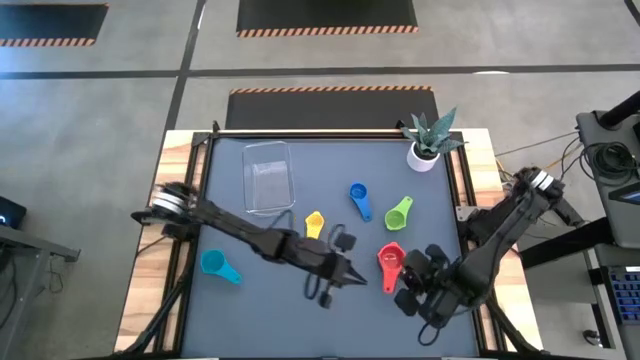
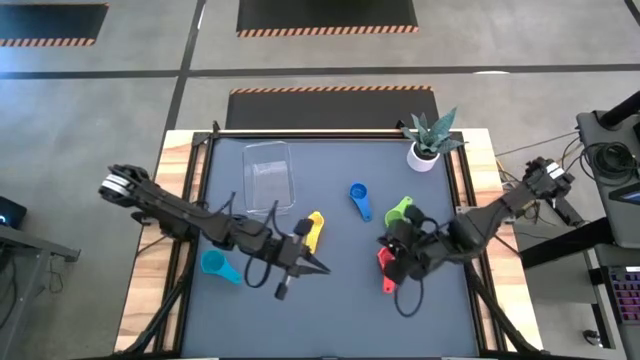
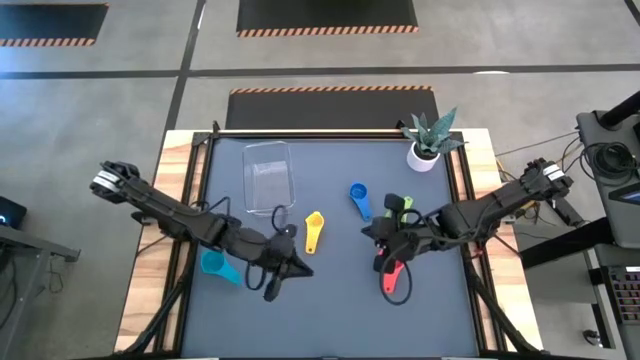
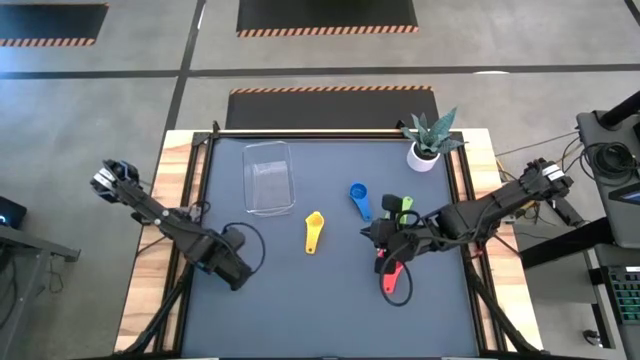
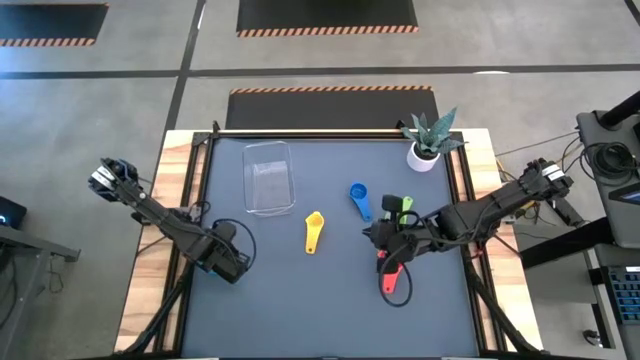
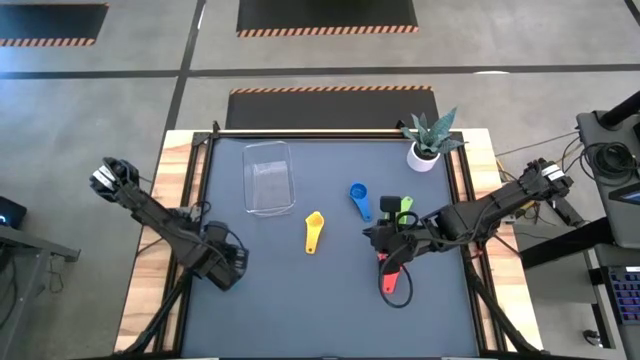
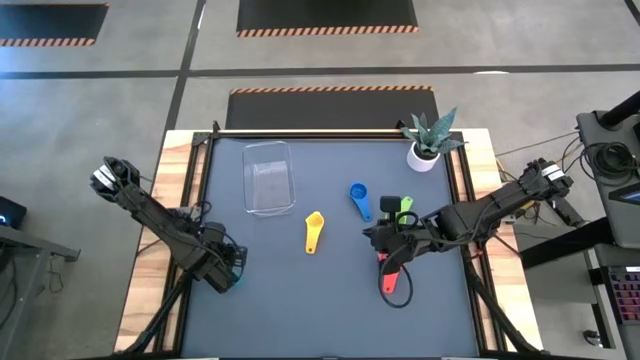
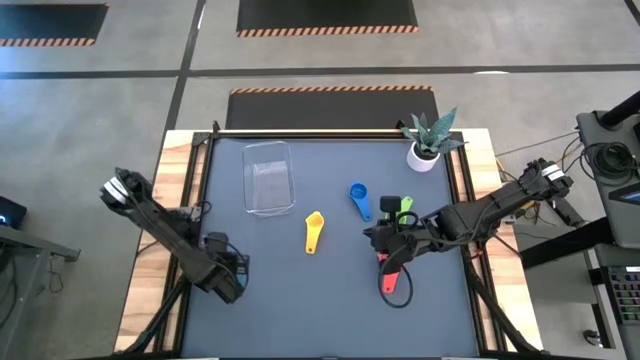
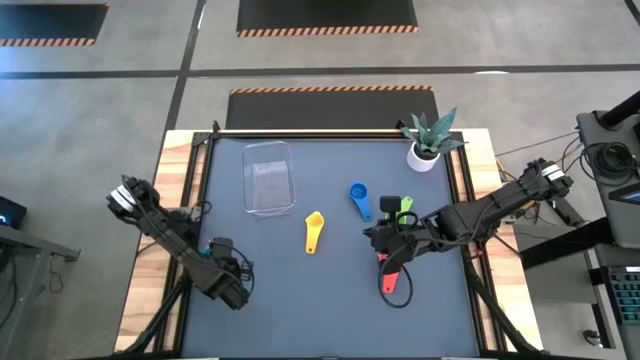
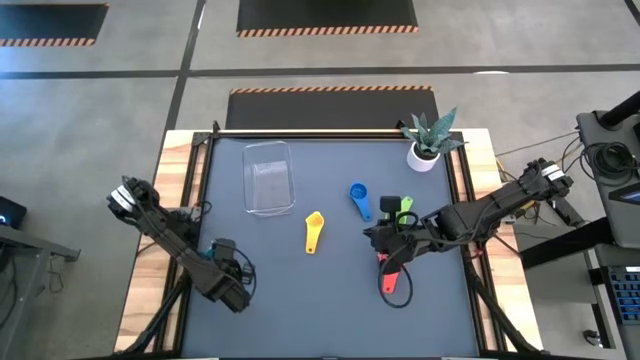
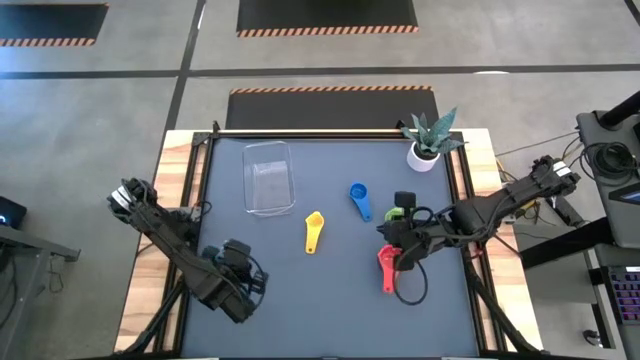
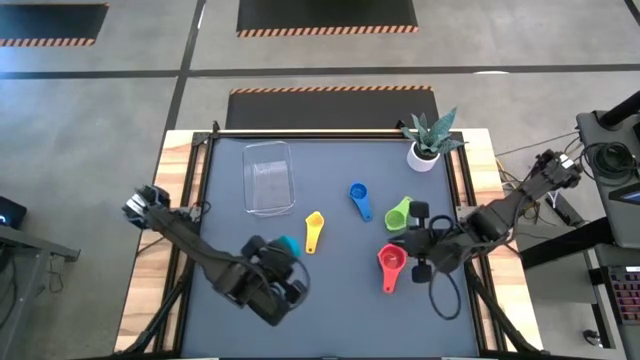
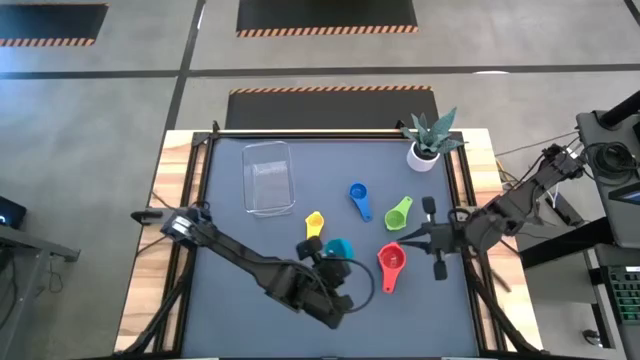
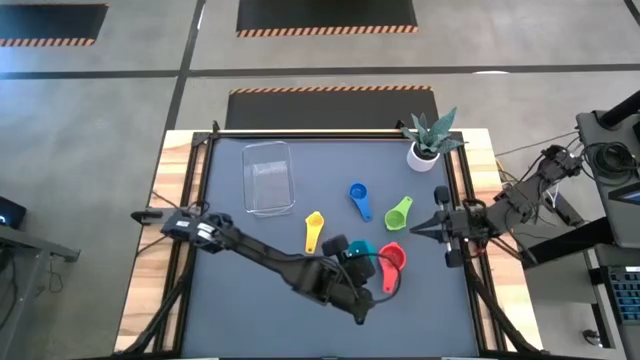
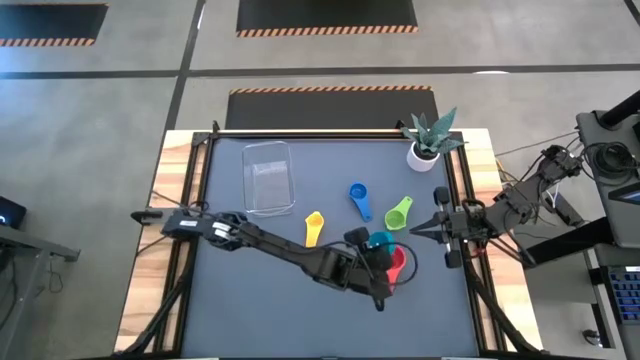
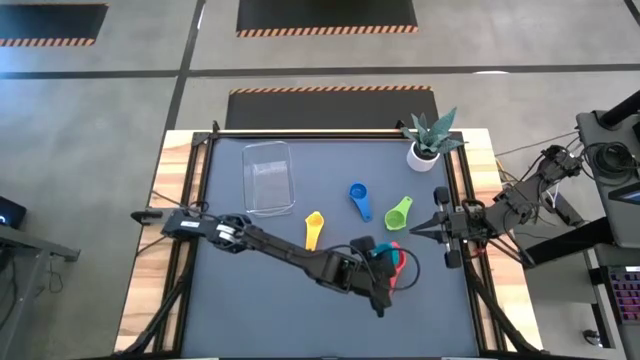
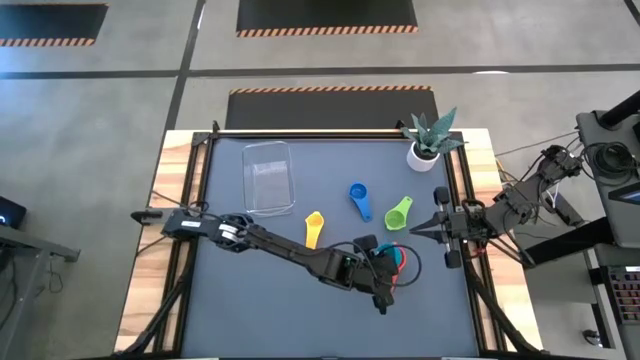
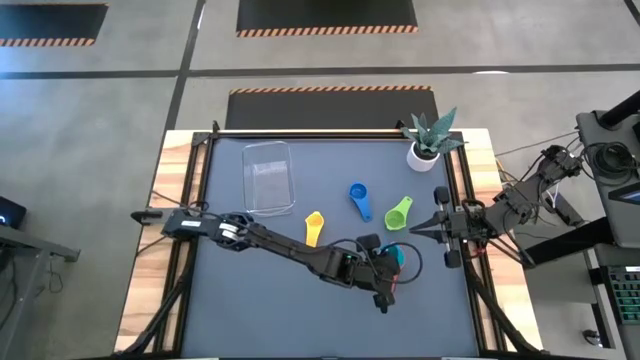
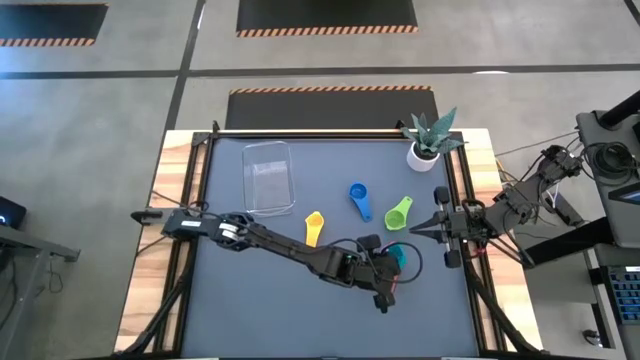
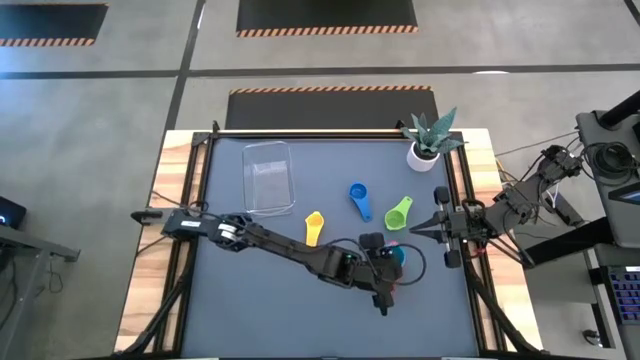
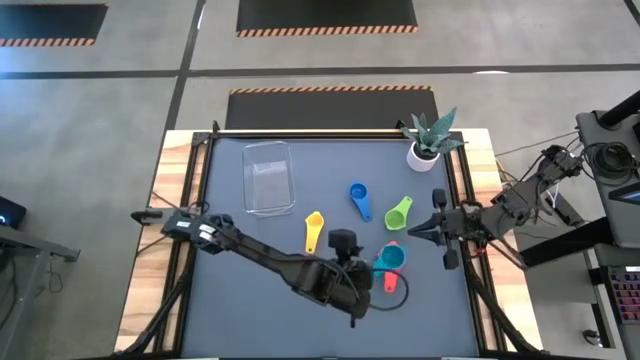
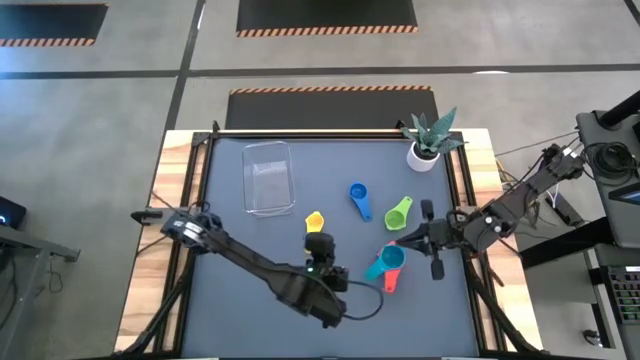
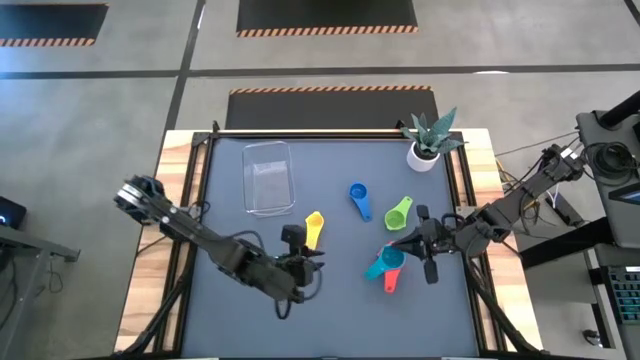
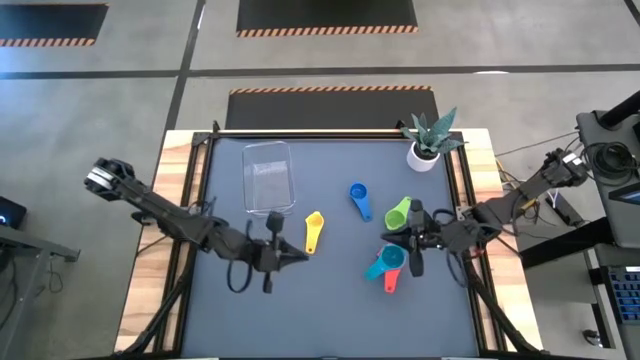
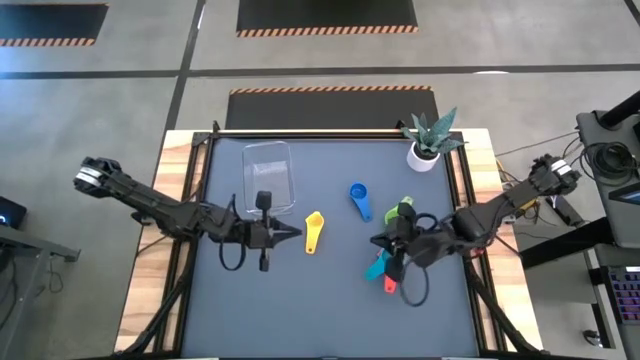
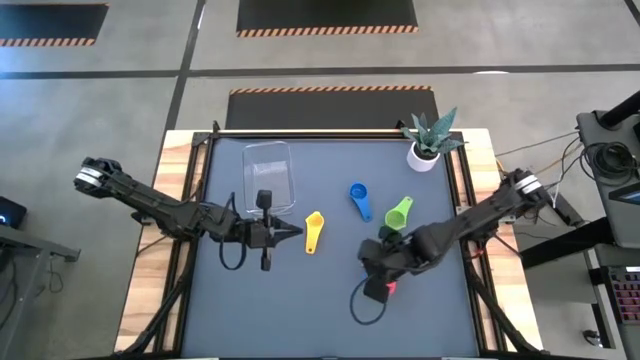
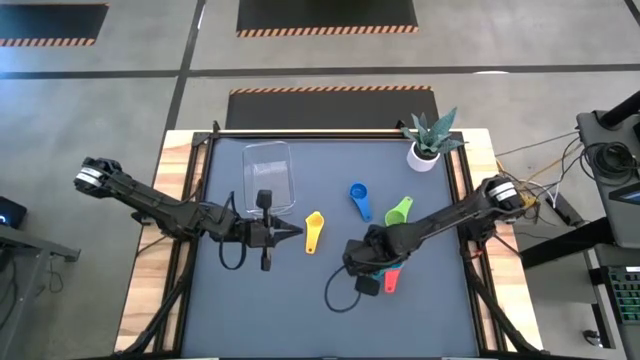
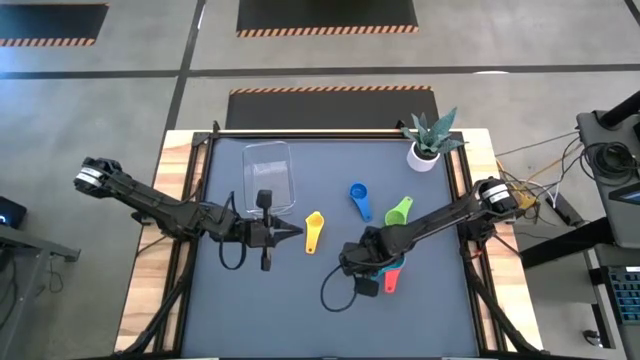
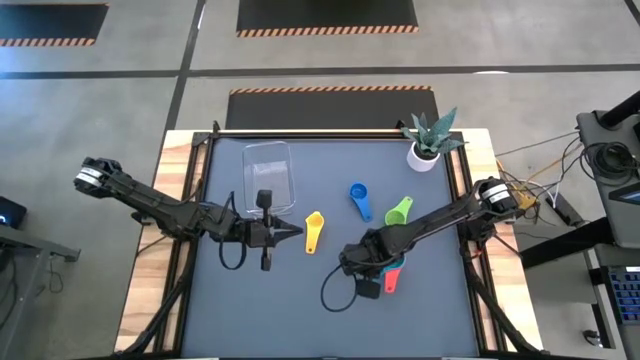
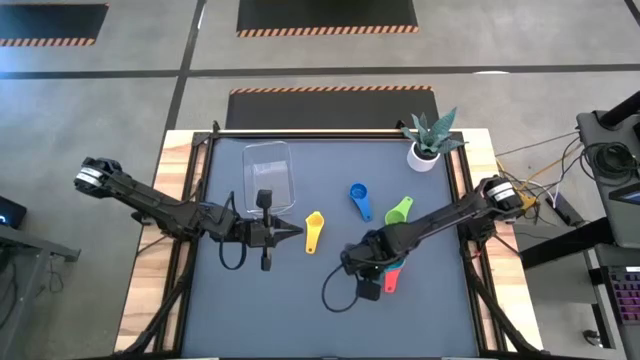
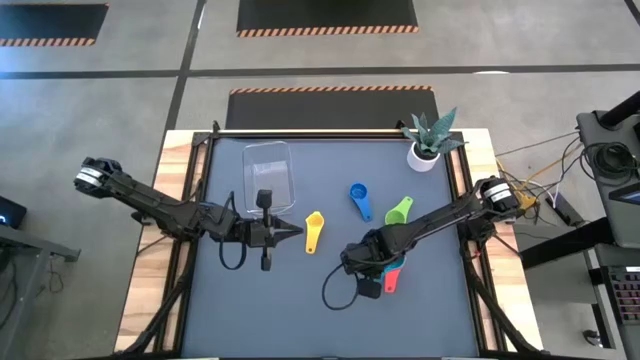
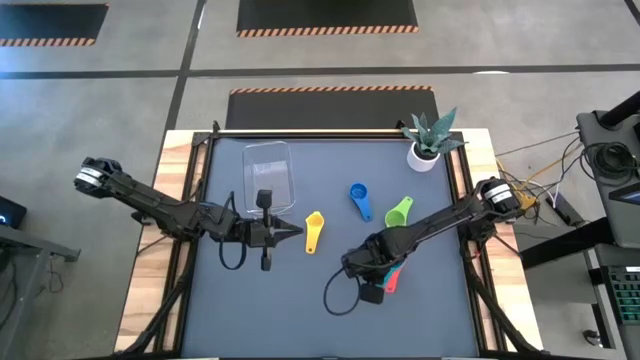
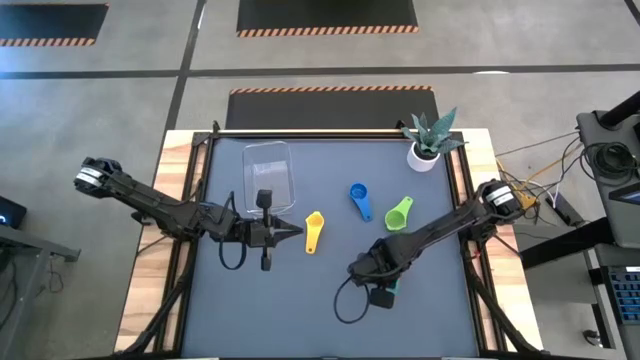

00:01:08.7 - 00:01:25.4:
Task: Nest measuring cups in basket
Stack the light blue measuring cup on top of the red measuring cup

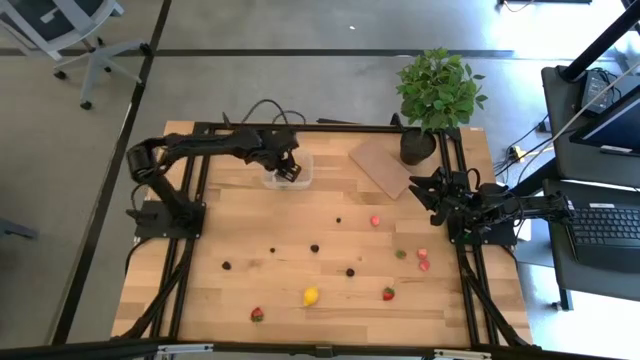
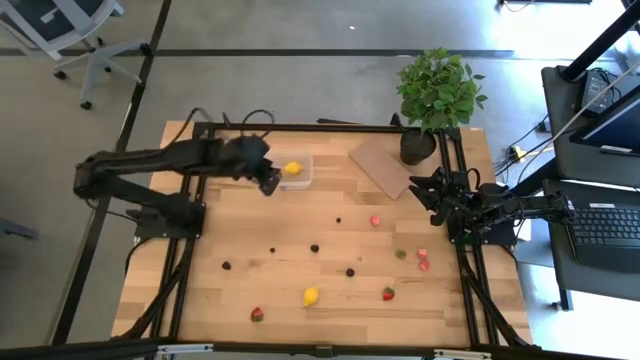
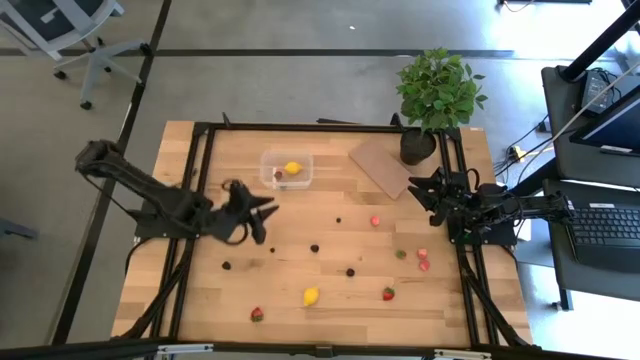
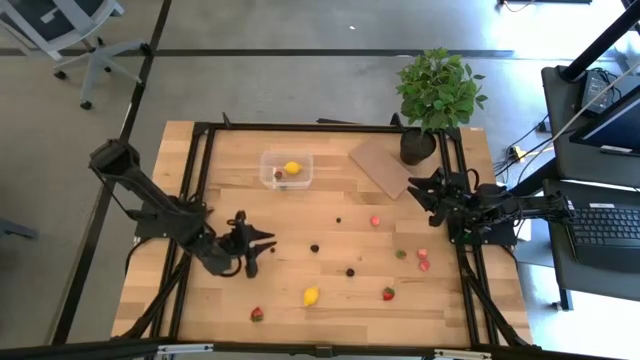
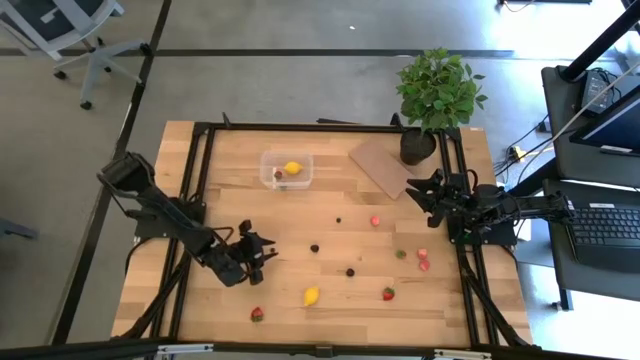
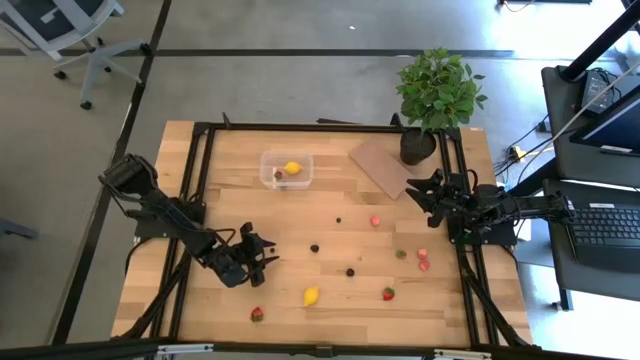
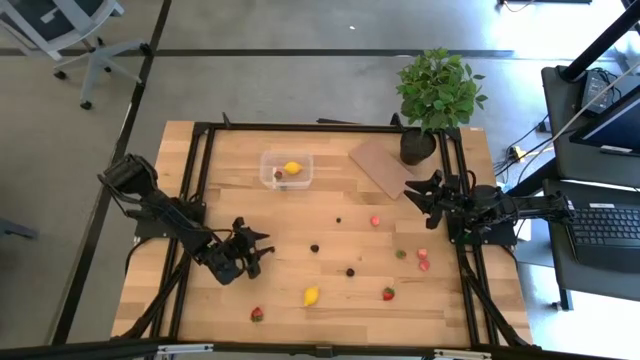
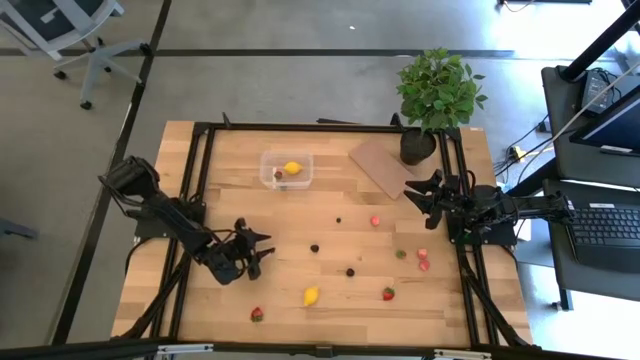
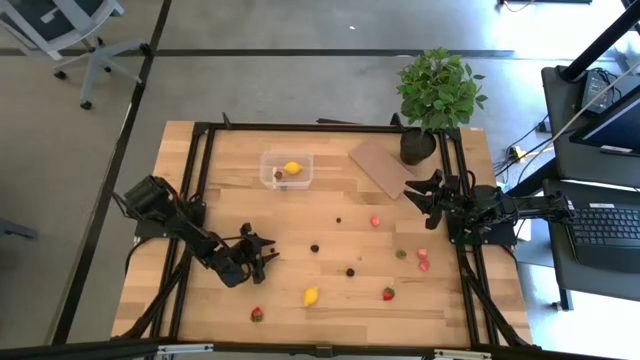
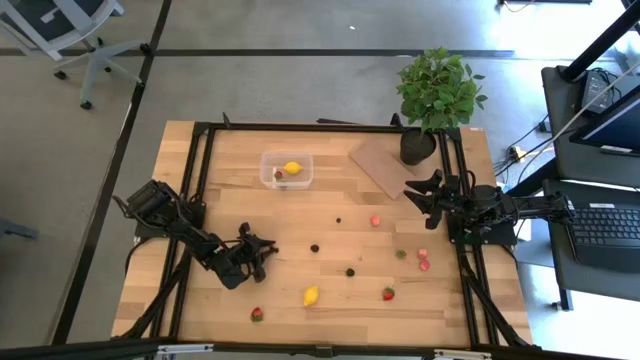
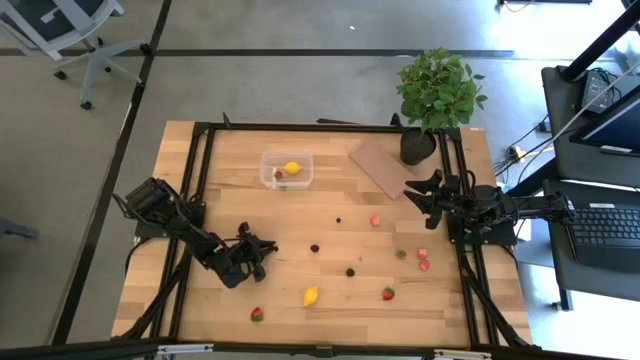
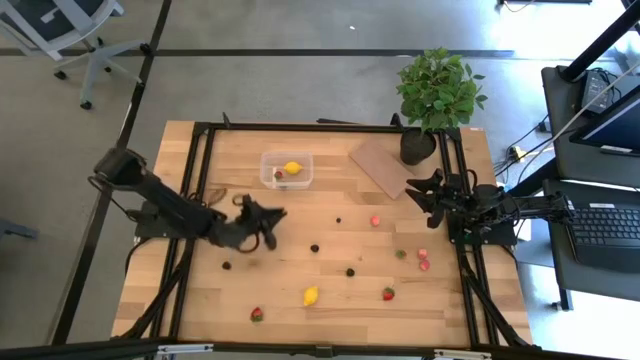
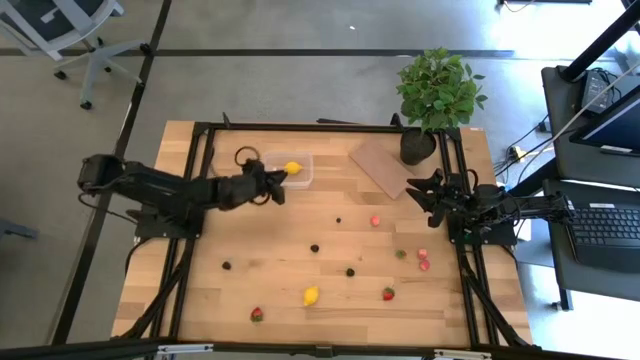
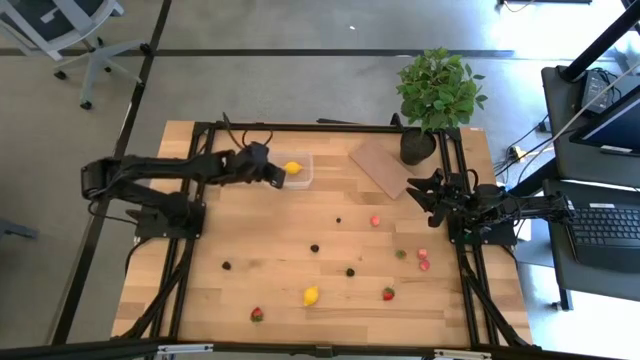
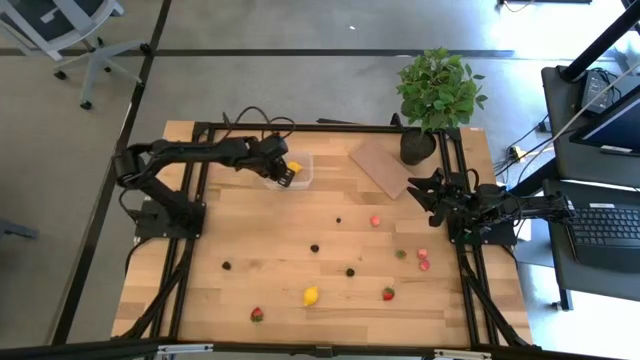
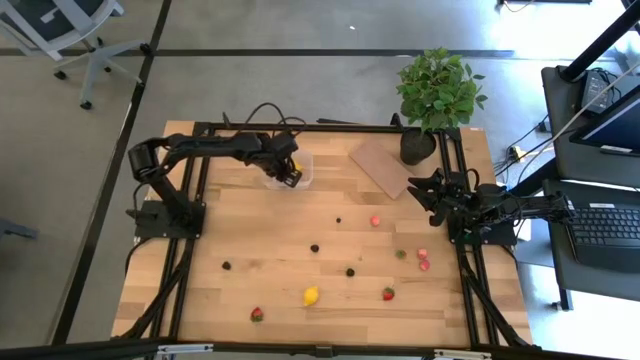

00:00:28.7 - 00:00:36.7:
Task: Pick and placing Produce into tupperware
Put the blueberry into the transparent bin
